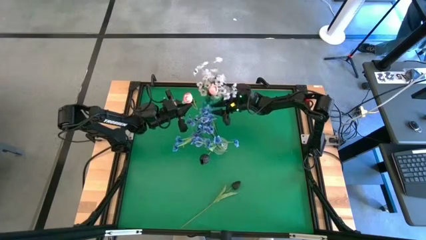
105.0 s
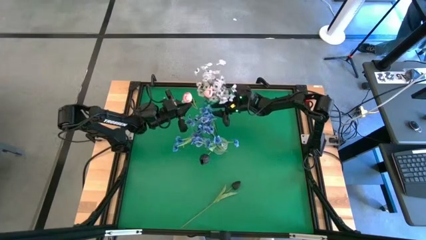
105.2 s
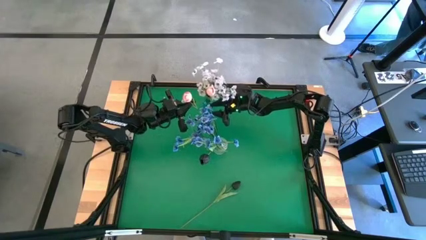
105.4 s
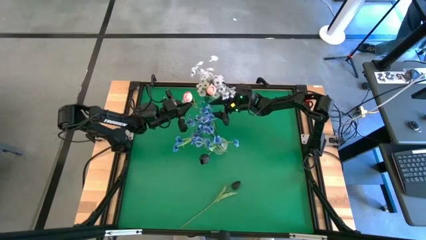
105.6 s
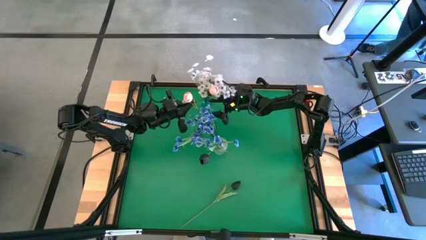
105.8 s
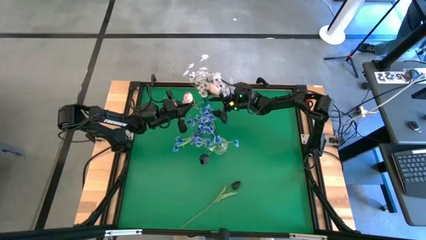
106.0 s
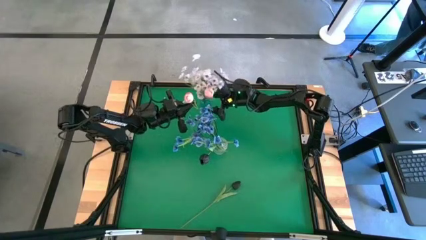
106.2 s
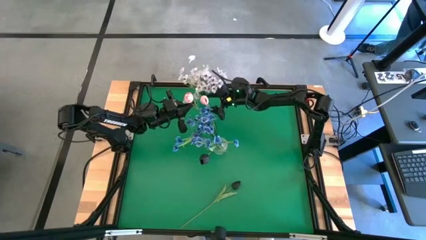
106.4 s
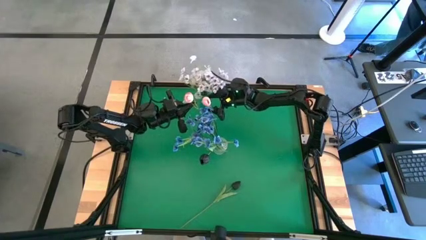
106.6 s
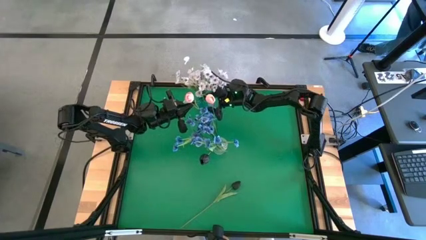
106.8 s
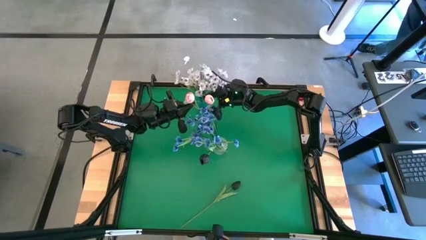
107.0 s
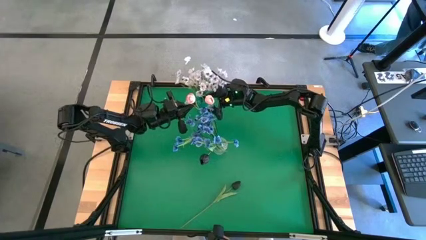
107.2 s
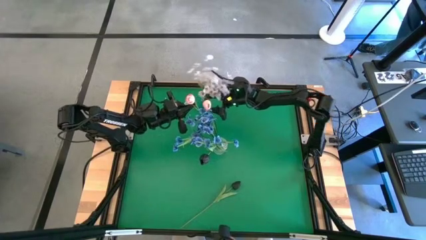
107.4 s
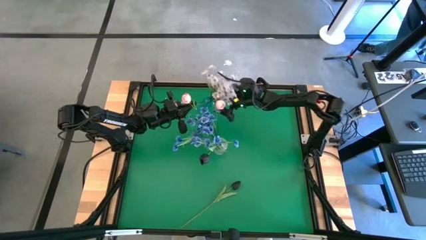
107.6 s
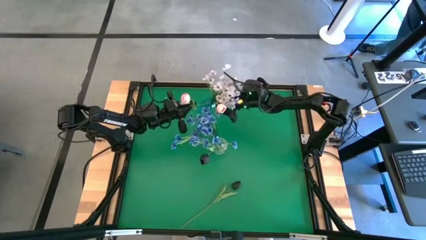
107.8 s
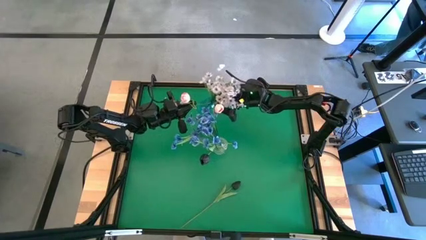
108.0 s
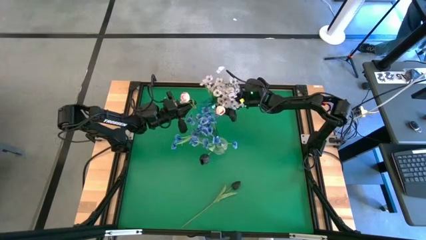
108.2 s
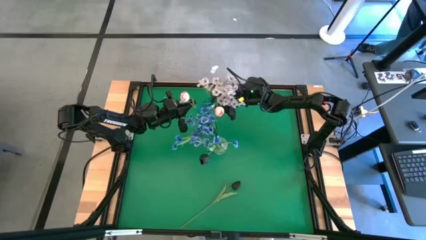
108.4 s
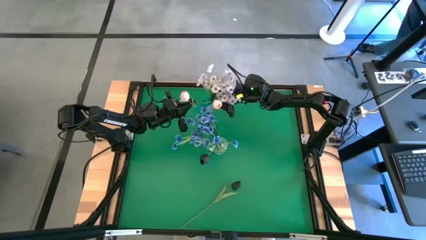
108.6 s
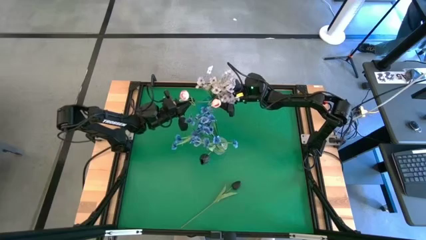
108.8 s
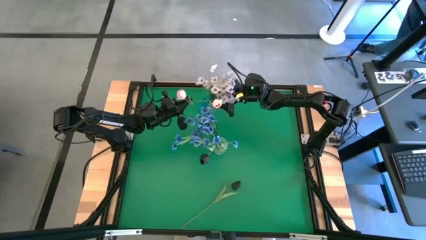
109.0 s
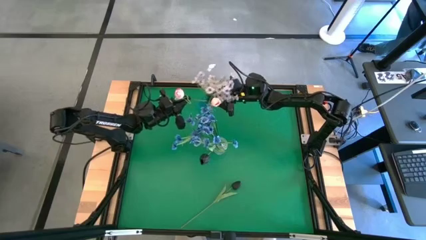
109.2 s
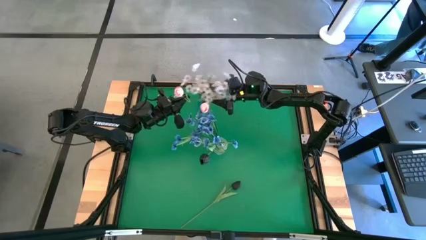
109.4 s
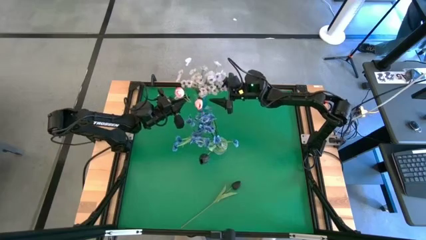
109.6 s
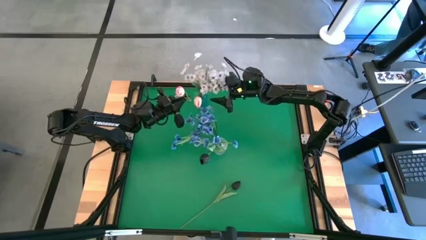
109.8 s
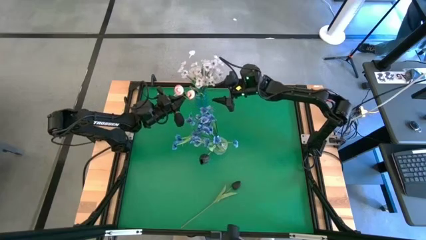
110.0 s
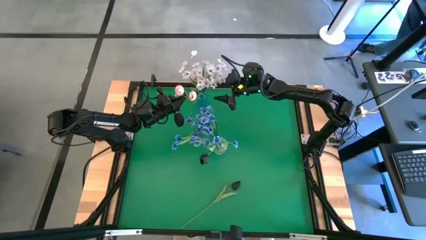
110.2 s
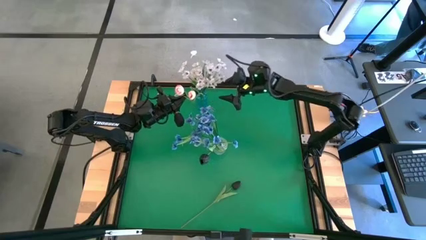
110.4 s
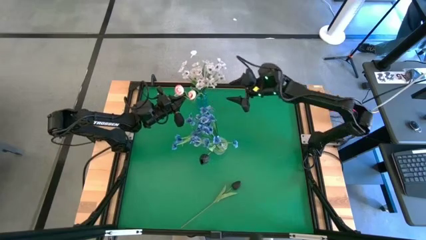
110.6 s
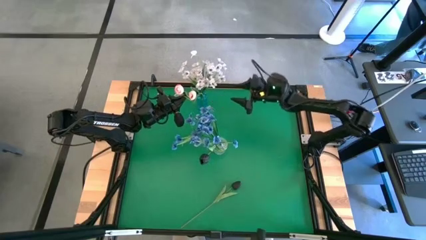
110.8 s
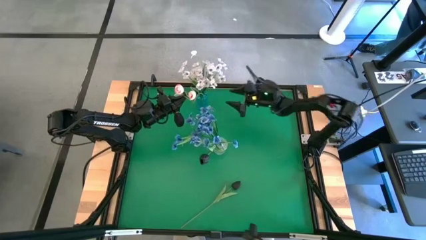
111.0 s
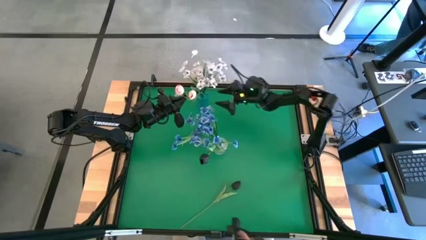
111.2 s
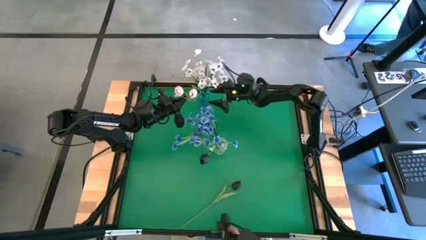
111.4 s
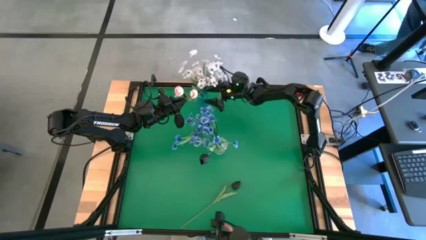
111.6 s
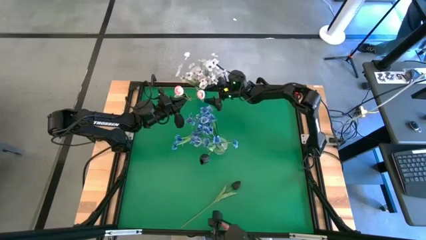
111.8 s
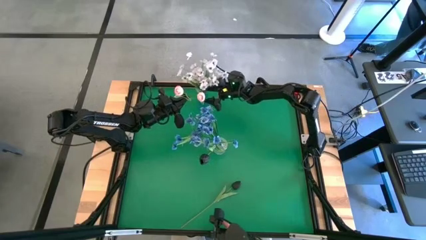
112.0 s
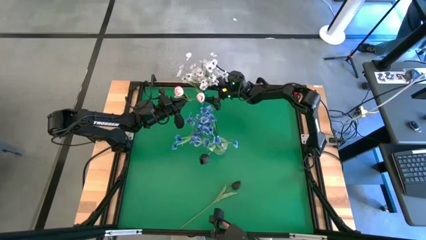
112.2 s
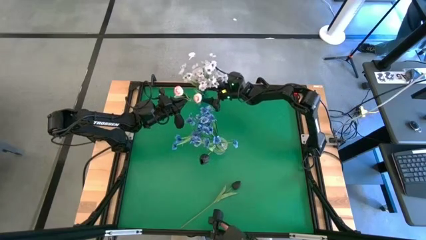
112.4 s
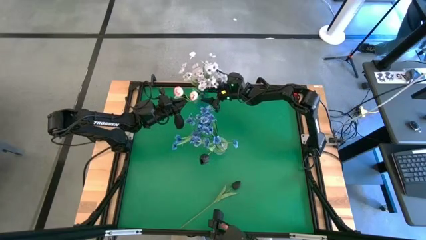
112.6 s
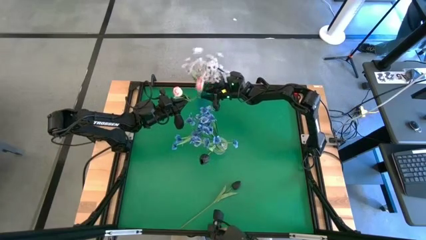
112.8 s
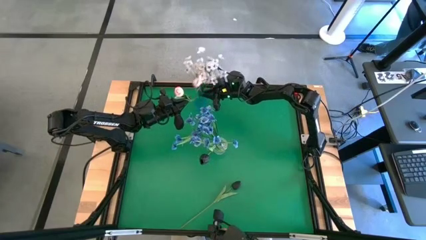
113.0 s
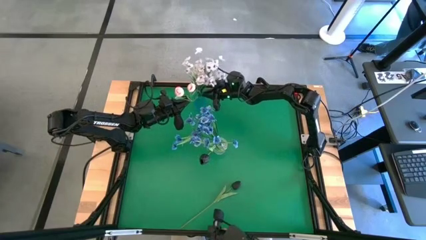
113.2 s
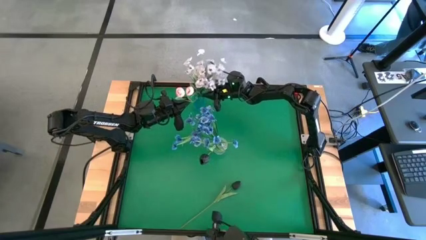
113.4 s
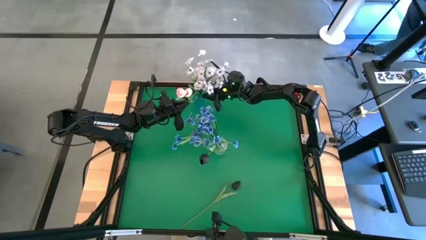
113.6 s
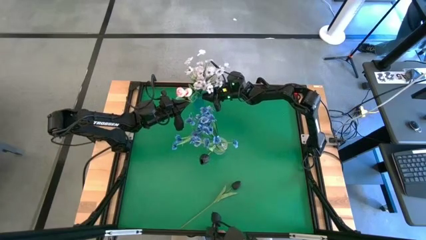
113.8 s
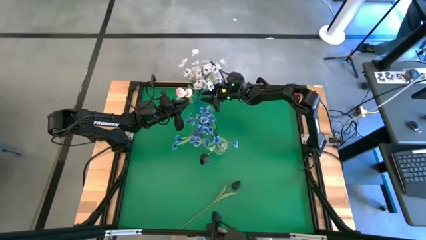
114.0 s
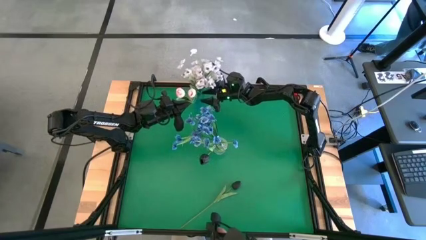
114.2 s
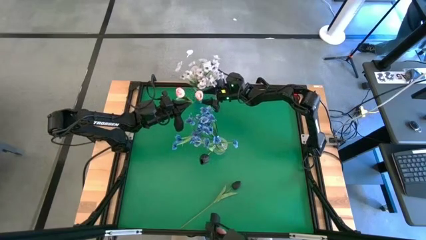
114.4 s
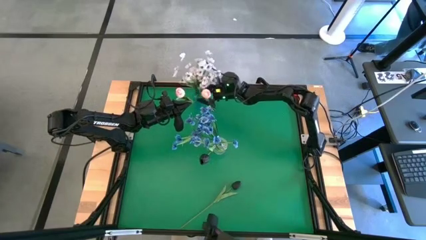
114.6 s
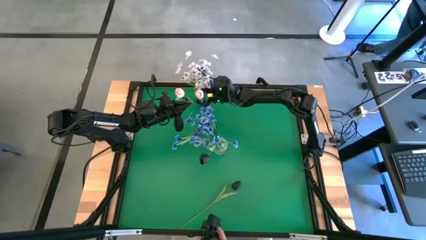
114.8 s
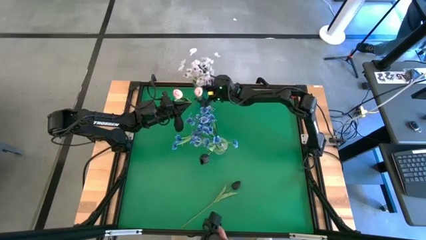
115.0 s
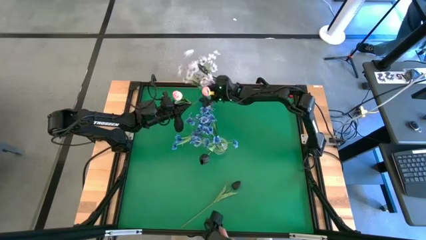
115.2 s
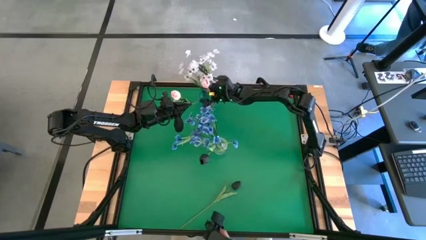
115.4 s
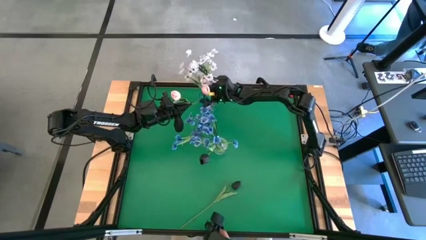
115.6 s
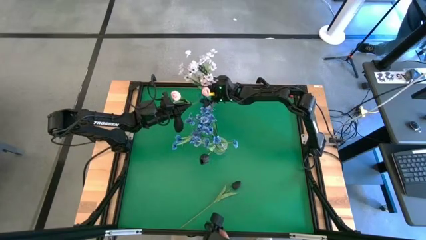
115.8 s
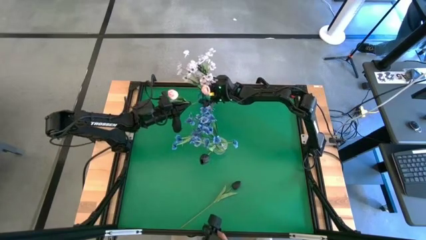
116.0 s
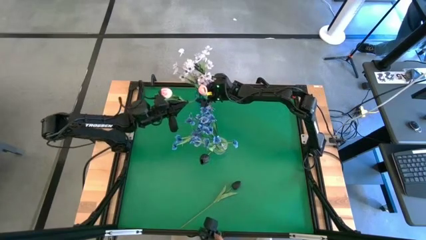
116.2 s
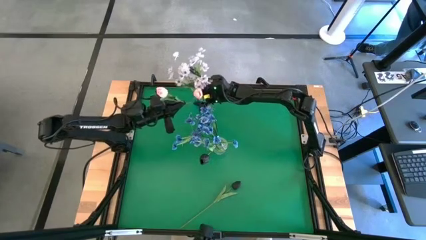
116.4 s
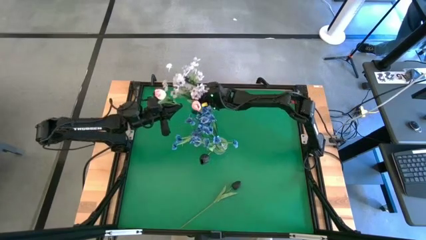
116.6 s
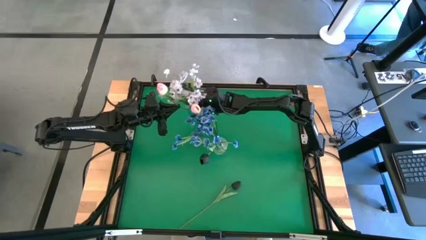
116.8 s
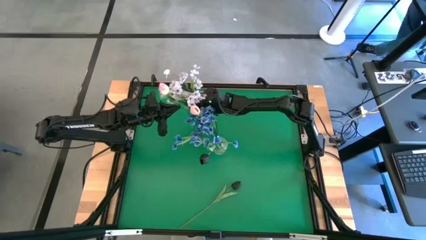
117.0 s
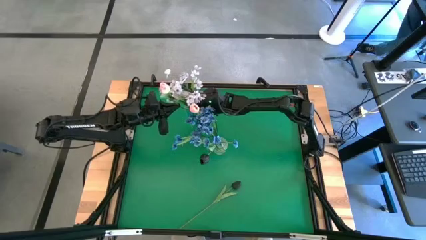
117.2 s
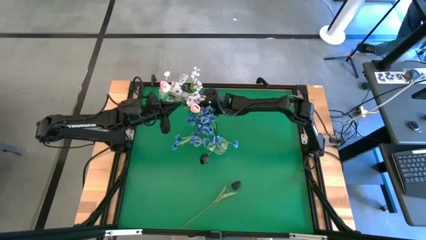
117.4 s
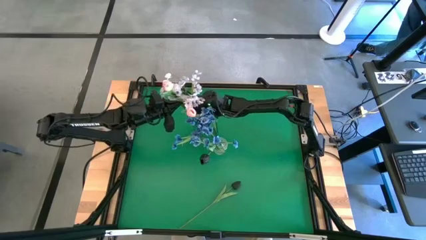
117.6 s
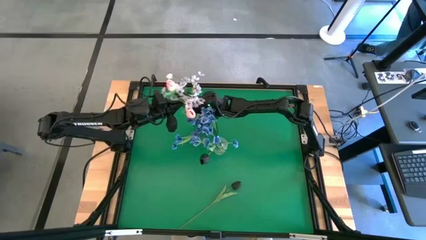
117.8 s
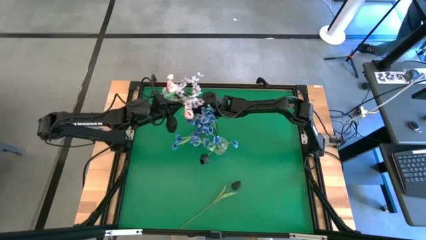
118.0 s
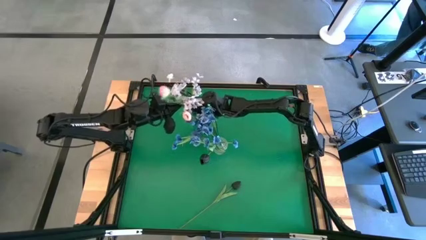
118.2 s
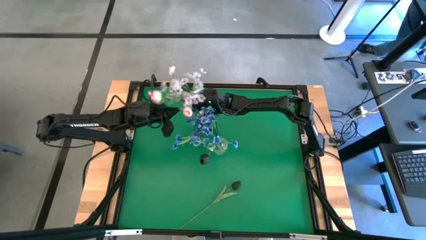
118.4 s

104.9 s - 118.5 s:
Task: Sort flowers into vase by color
Put the pink flowers into the blue transparent vase
